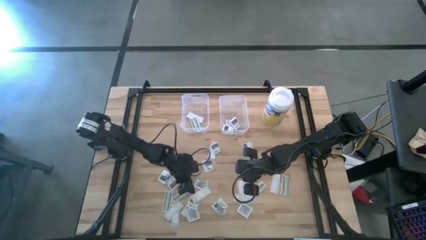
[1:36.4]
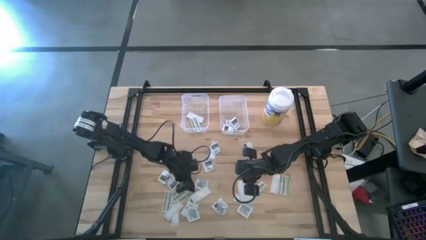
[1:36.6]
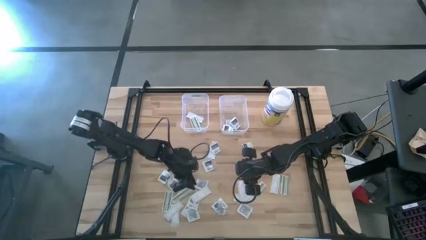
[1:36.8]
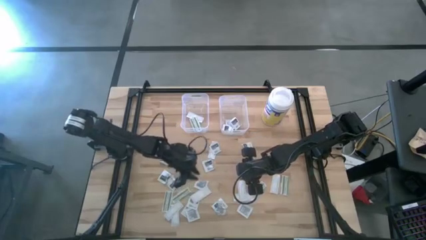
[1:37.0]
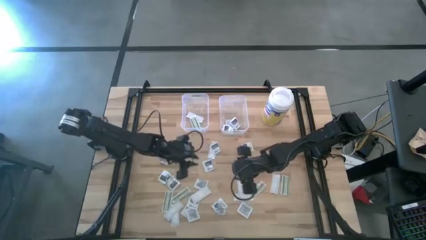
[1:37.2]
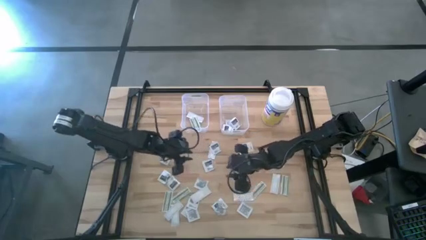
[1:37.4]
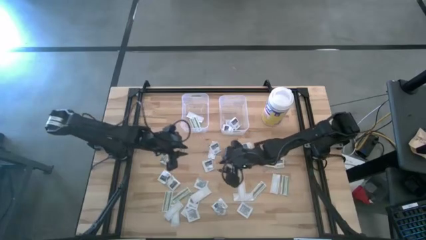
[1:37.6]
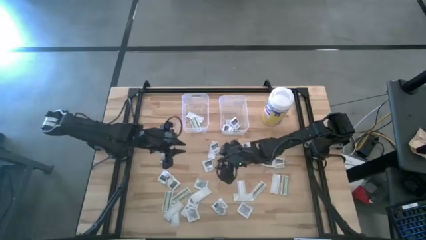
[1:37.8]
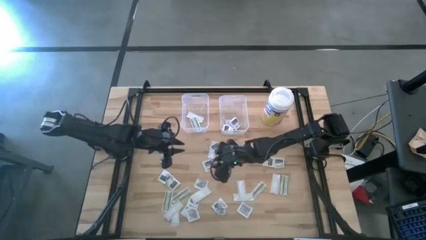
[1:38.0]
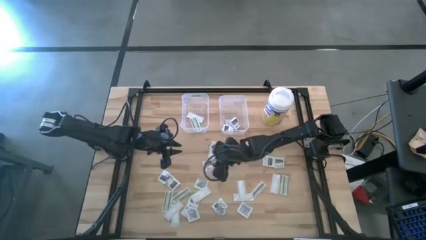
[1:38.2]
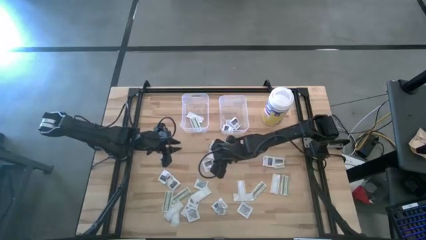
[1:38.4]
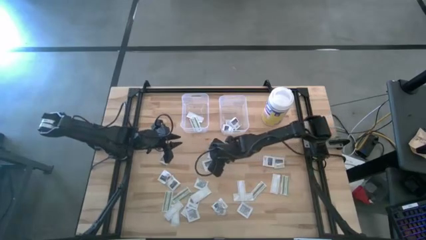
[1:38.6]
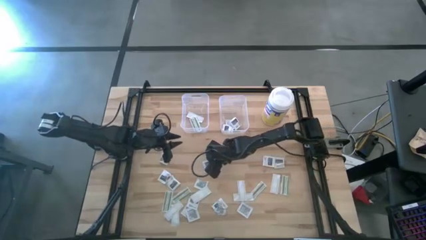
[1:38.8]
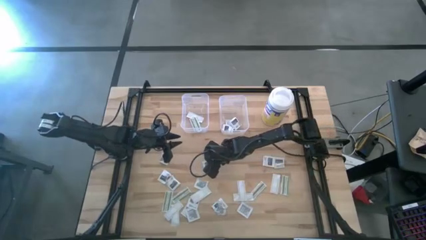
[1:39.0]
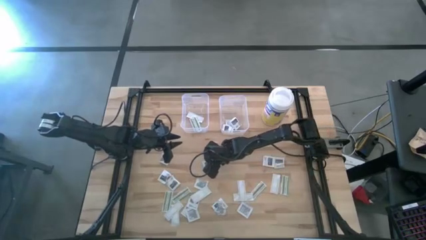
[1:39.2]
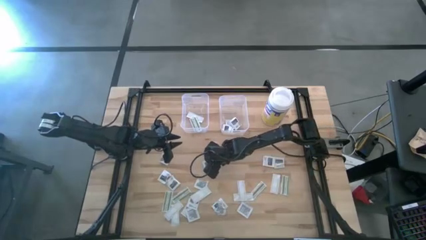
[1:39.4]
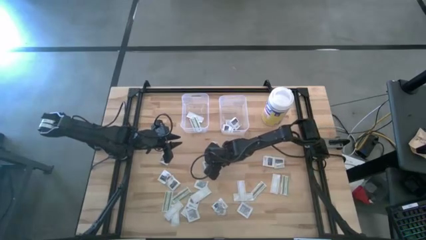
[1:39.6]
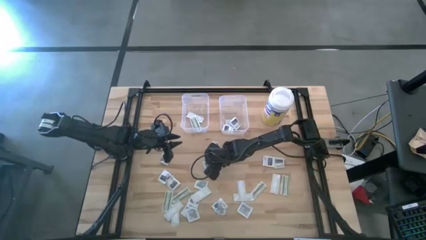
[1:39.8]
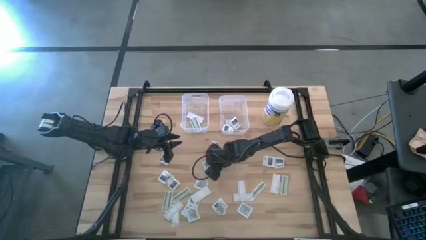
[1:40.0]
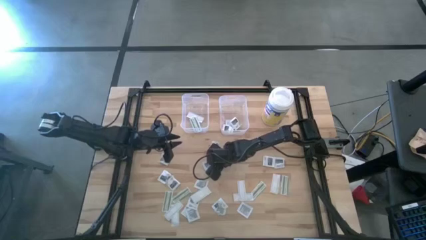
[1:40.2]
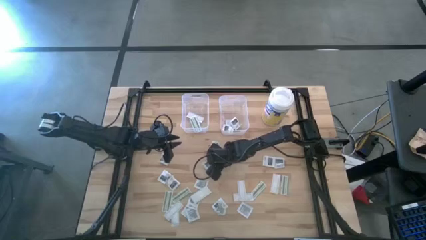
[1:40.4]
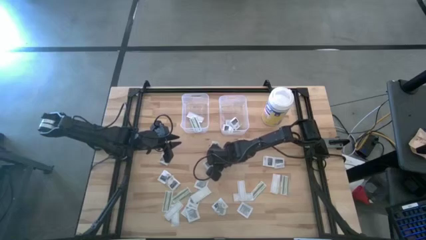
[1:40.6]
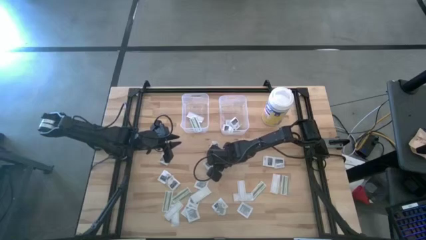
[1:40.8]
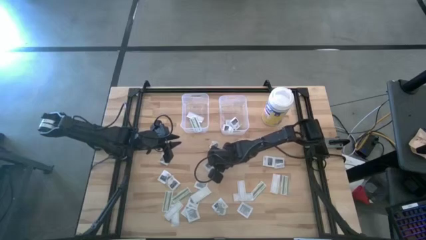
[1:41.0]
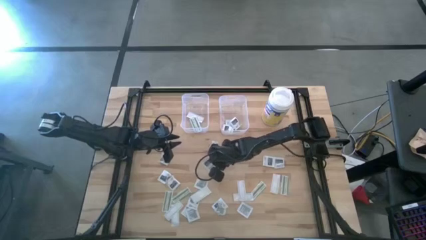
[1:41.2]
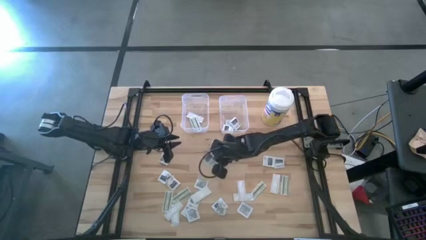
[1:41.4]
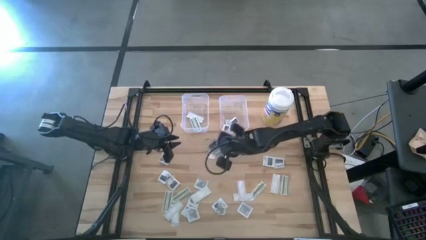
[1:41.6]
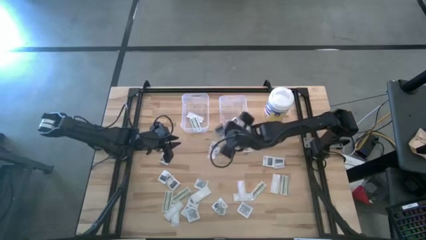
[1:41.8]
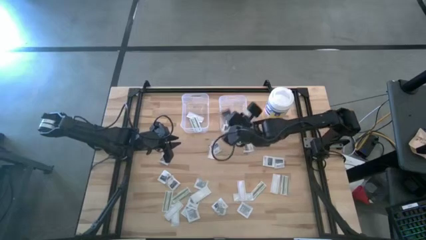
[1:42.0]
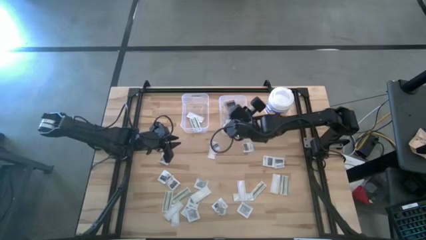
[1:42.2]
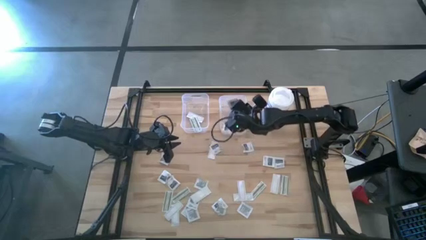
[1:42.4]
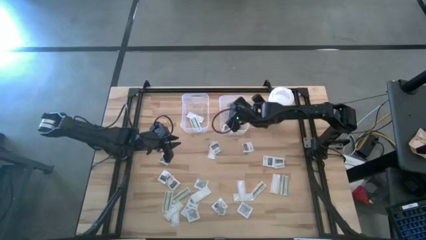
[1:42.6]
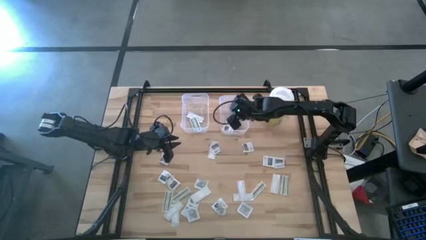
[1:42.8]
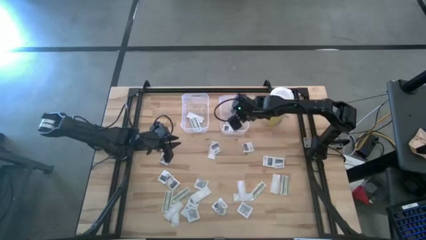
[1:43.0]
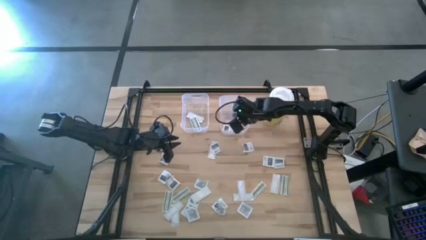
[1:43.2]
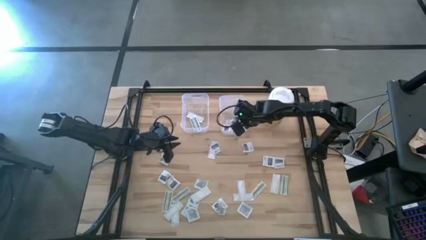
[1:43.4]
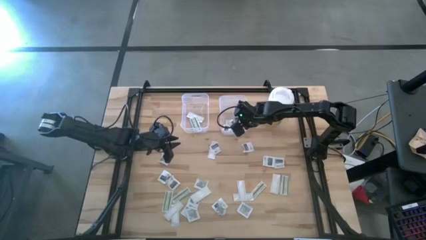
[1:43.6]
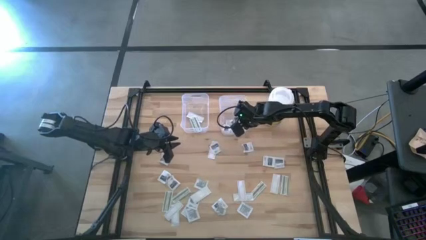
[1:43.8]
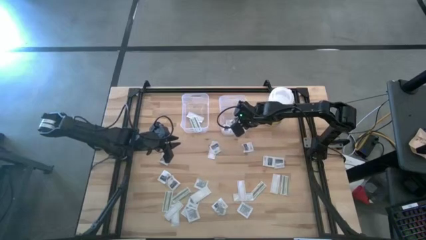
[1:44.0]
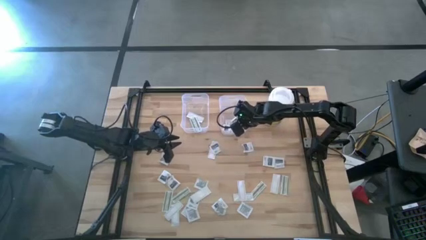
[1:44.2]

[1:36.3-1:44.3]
Task: Pick & Place First Aid Supplies
Put the gray towelette pack into the right transparent bin

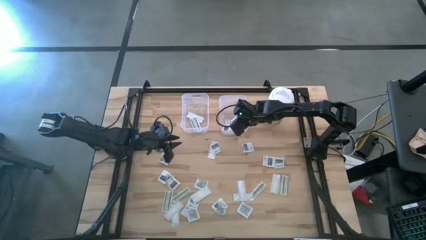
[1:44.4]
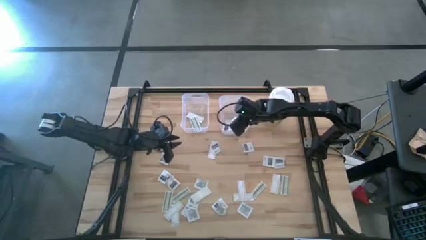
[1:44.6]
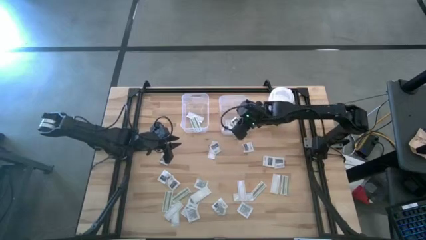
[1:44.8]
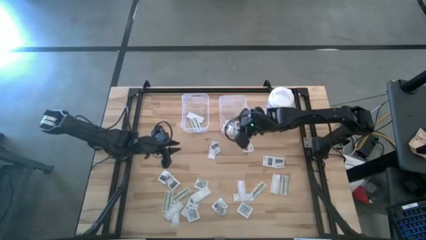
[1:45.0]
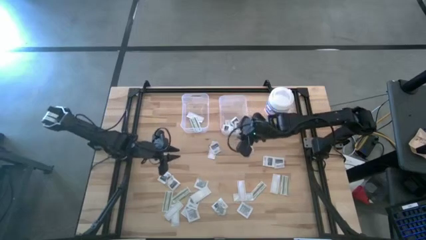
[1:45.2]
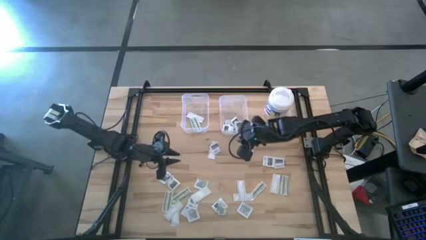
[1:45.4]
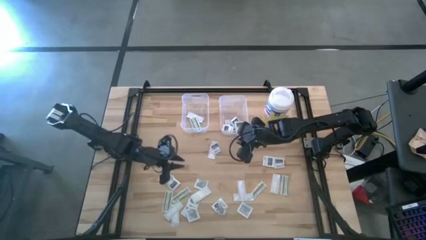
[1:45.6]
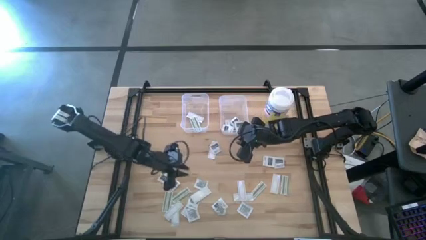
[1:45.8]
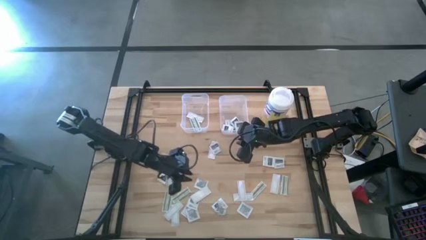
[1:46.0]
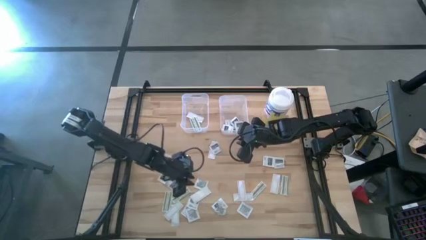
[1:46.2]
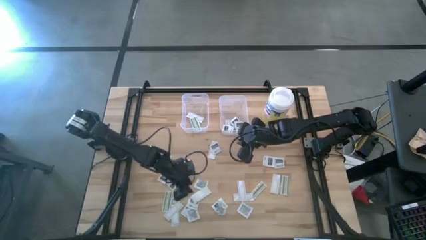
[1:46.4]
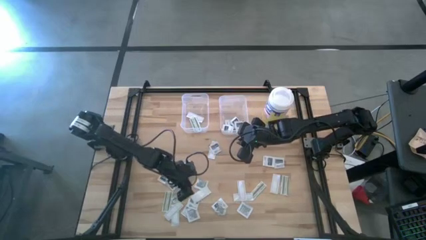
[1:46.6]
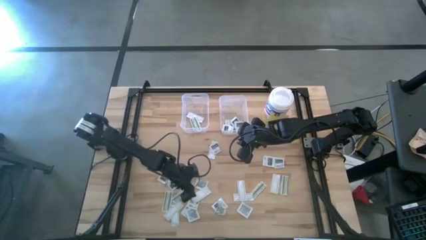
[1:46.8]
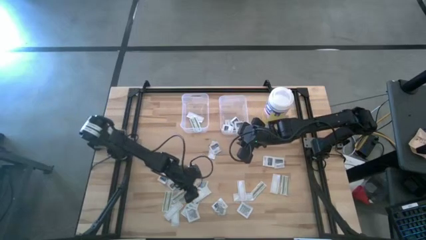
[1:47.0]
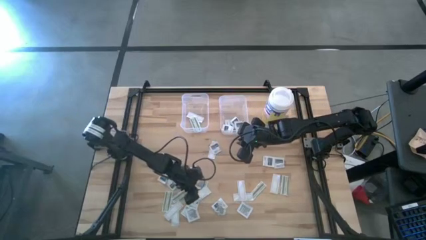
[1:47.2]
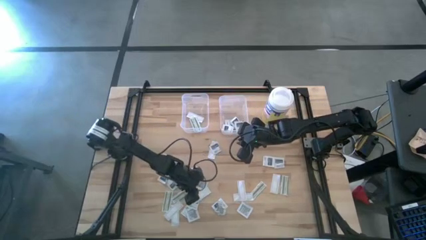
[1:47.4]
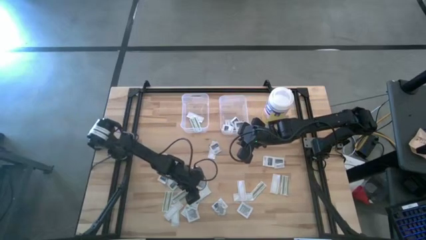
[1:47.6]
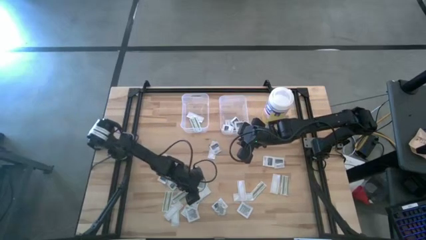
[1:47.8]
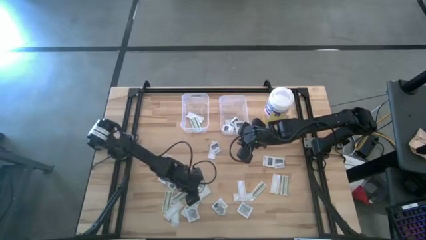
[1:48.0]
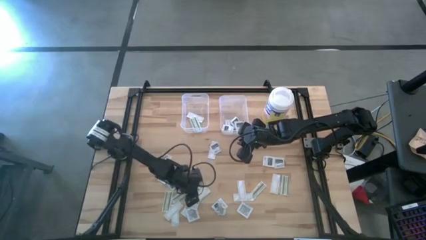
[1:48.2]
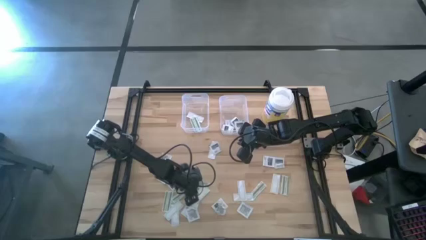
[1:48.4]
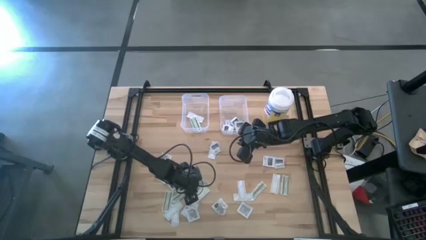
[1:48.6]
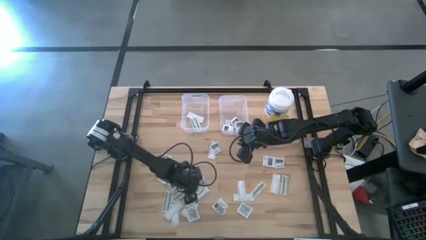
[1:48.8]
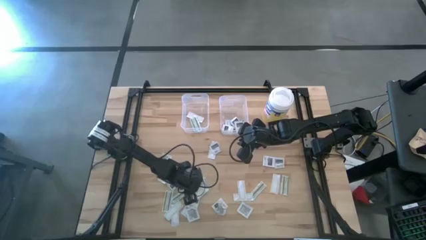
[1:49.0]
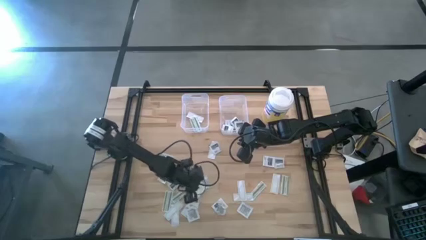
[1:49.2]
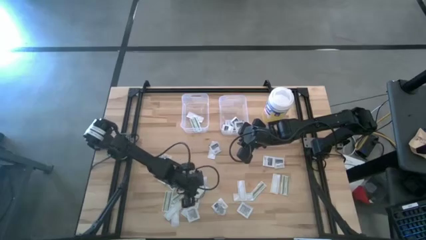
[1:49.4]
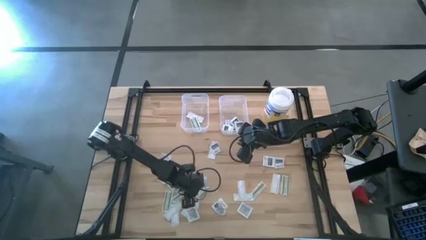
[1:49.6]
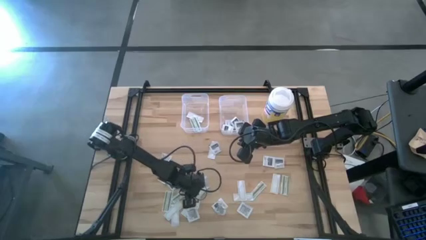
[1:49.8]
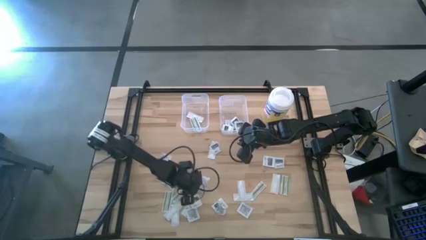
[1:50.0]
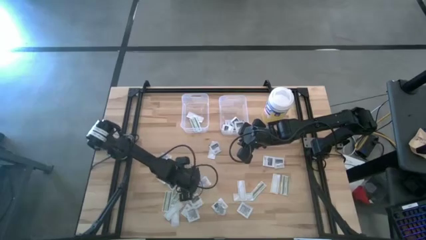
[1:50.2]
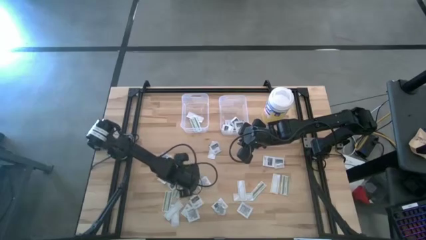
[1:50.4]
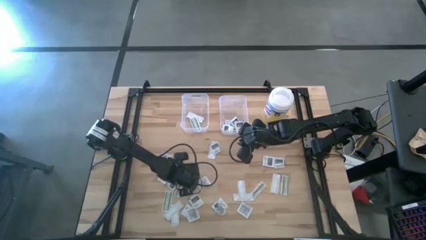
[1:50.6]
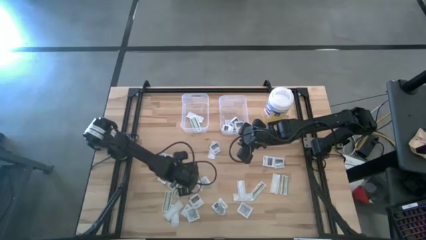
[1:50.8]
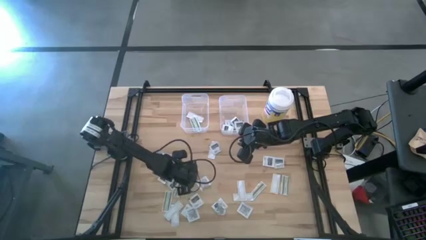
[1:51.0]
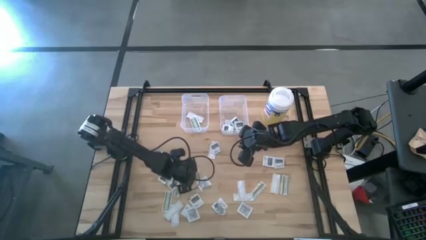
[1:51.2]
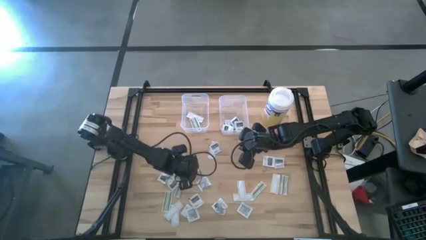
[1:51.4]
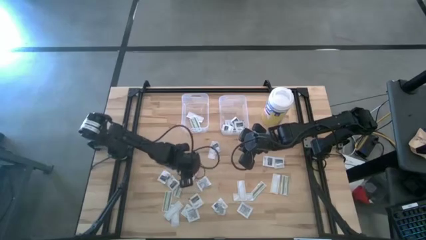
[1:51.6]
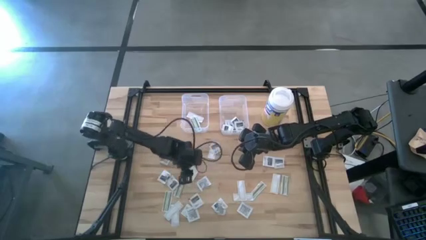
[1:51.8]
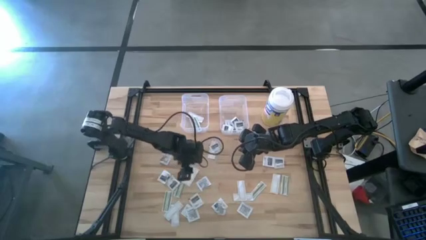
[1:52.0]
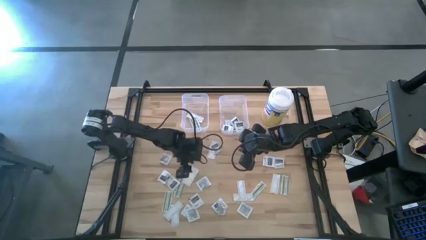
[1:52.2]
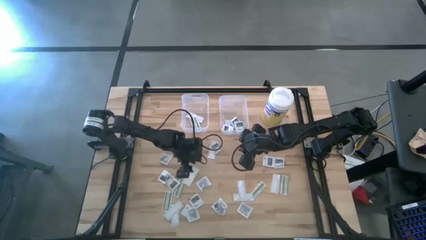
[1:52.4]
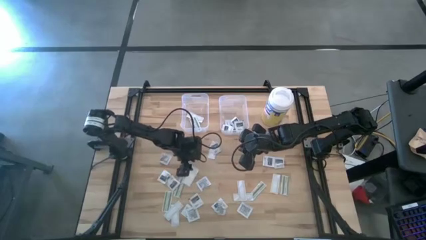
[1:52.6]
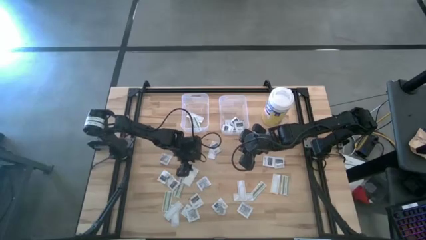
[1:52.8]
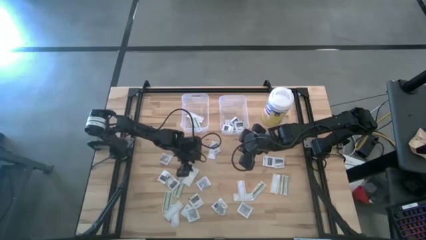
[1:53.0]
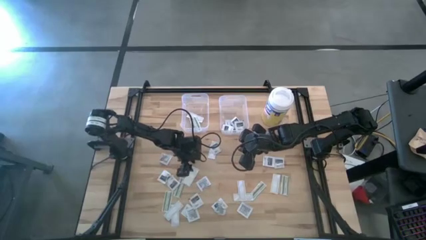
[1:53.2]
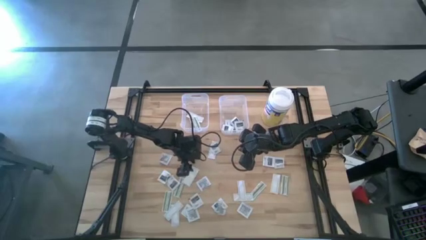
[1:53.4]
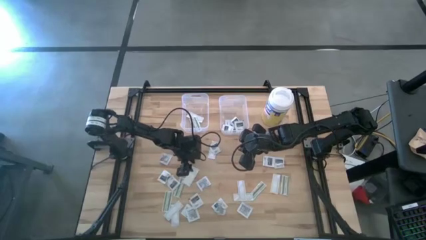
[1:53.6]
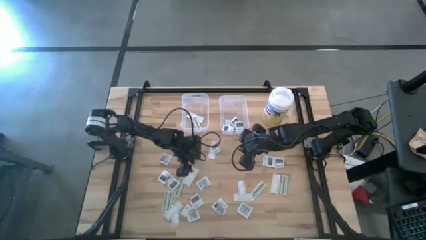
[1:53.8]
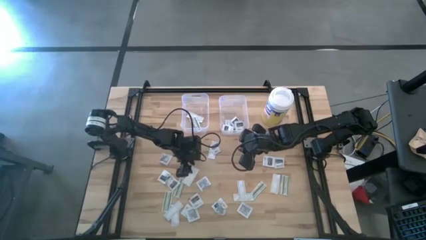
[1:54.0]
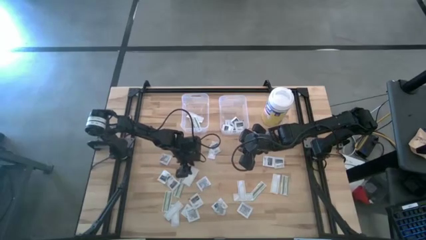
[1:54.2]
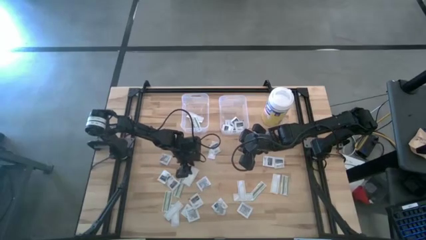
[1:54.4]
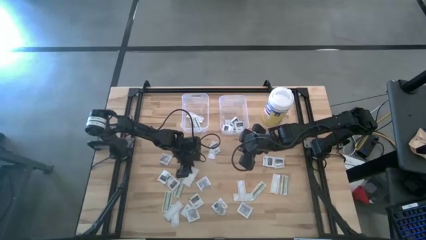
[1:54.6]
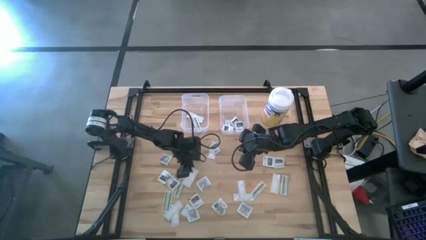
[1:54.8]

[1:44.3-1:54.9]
Put the green bandage pack into the left transparent bin
